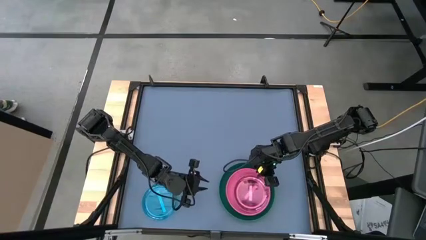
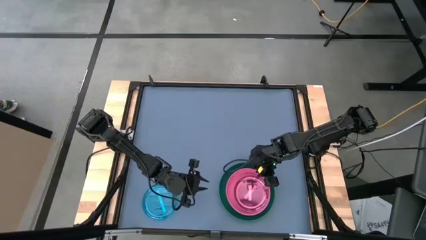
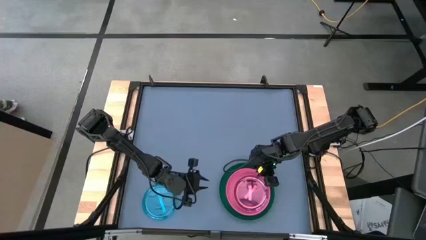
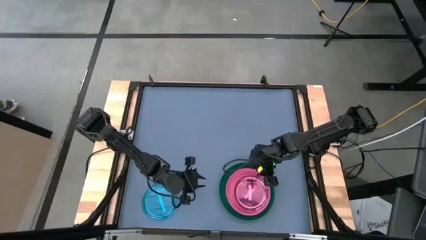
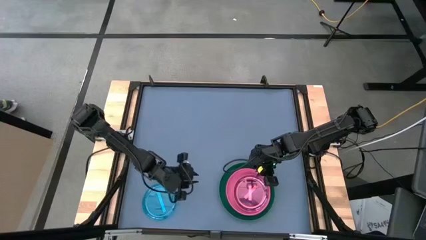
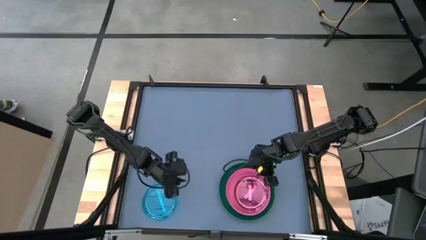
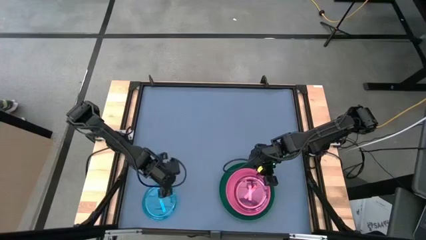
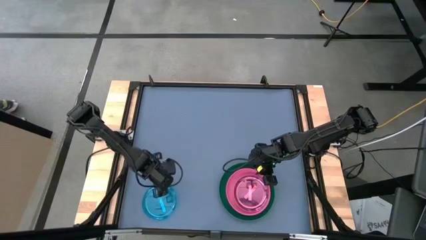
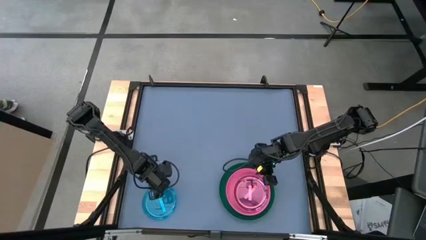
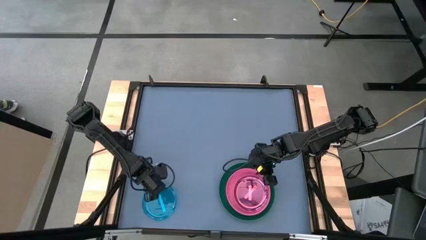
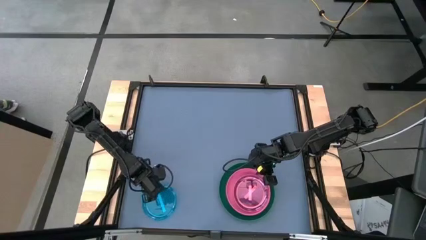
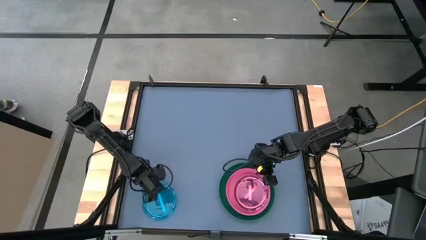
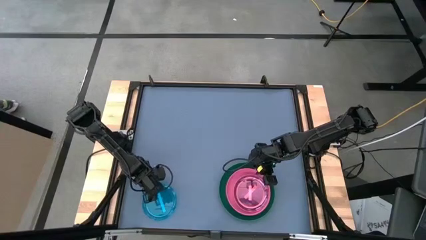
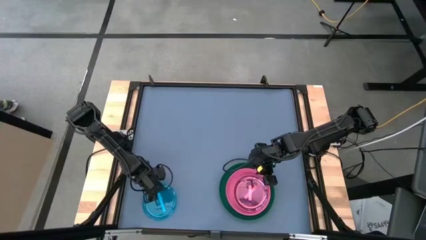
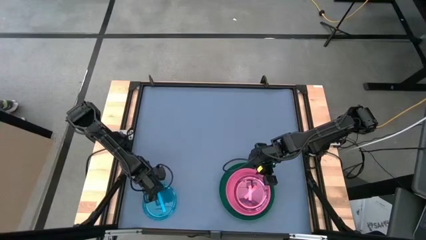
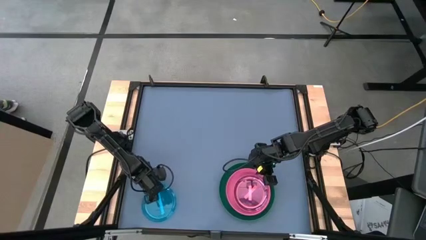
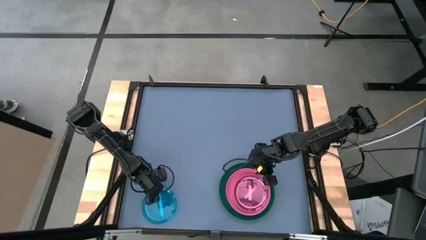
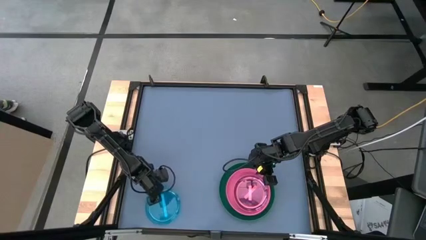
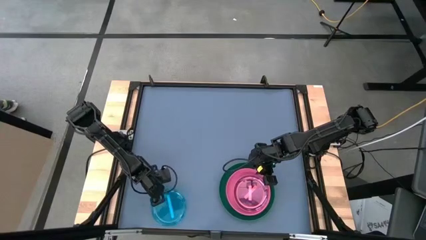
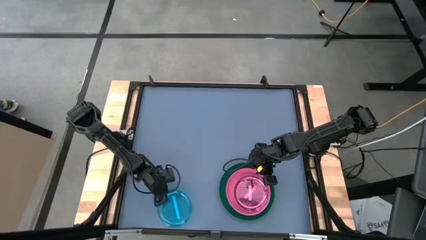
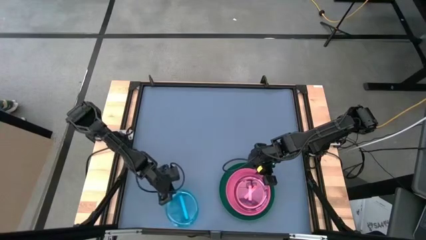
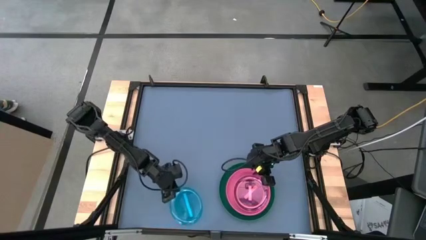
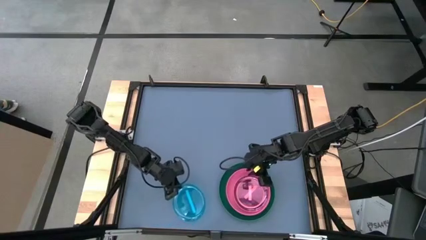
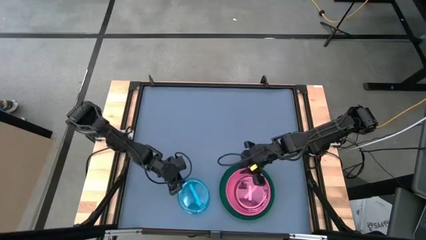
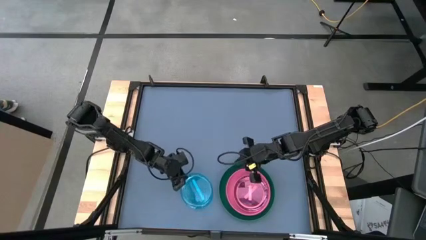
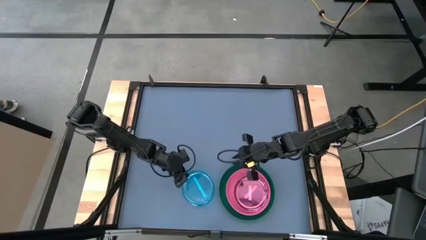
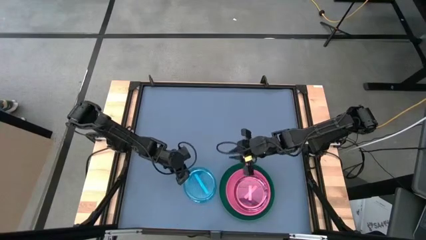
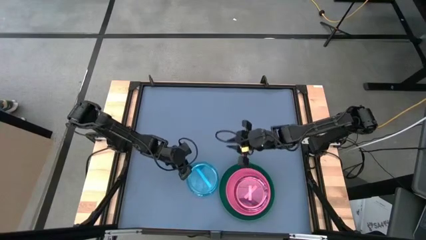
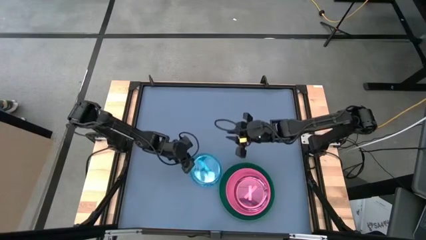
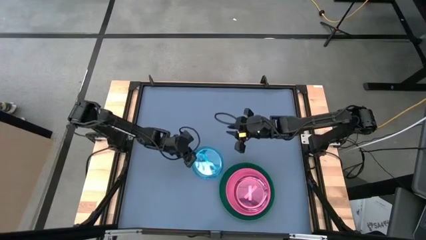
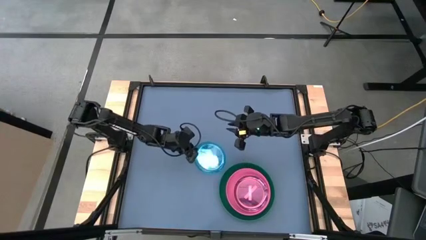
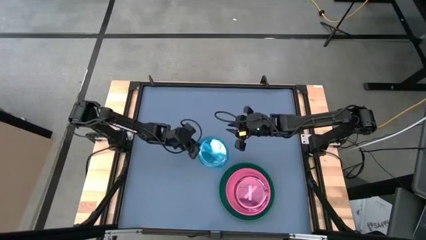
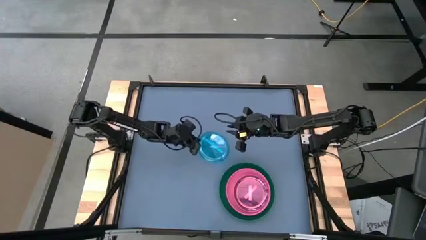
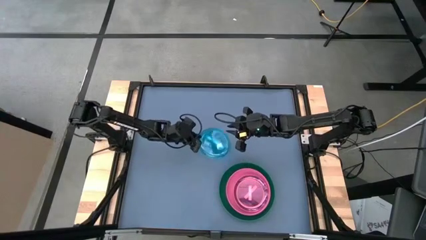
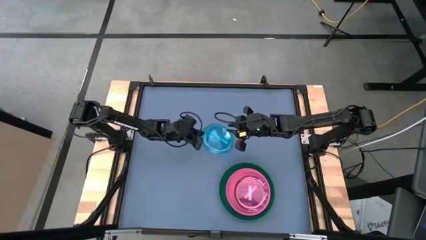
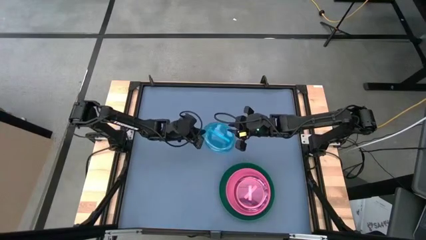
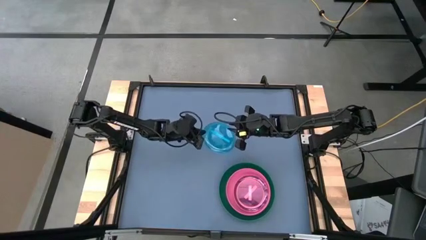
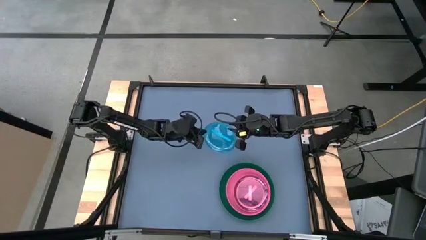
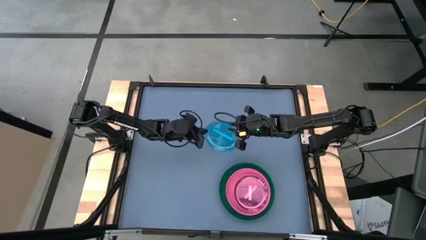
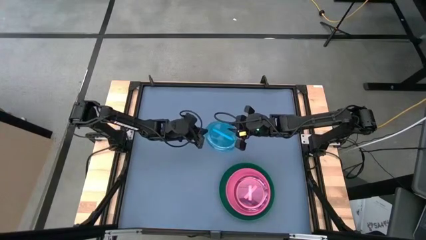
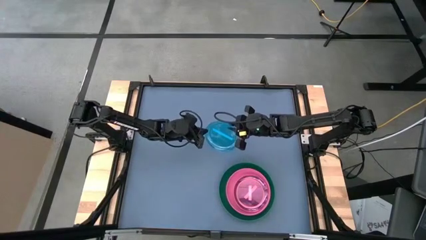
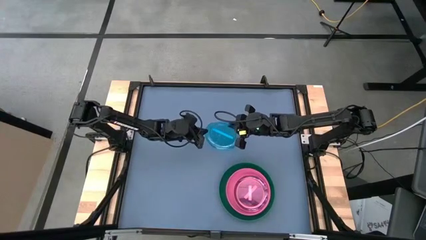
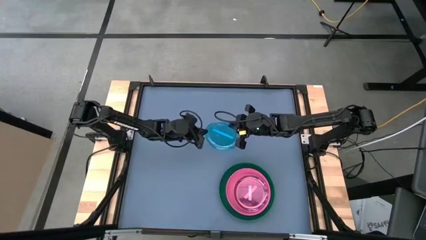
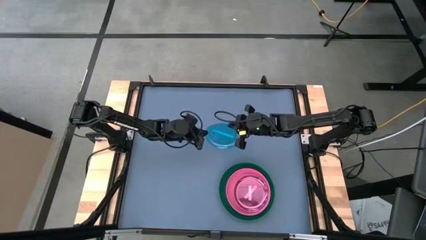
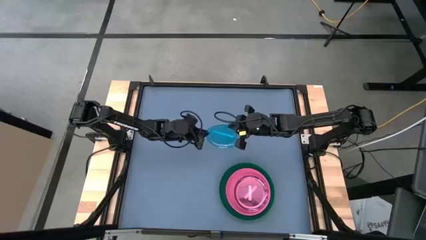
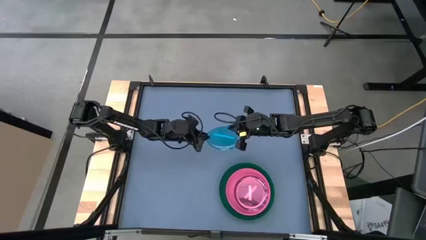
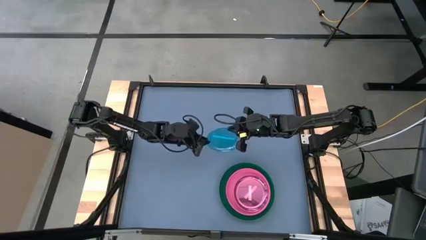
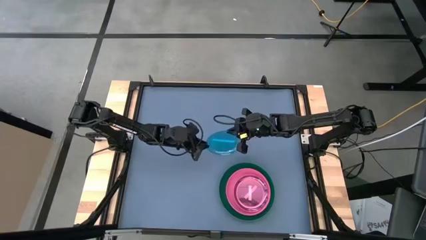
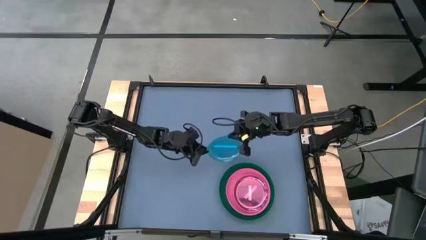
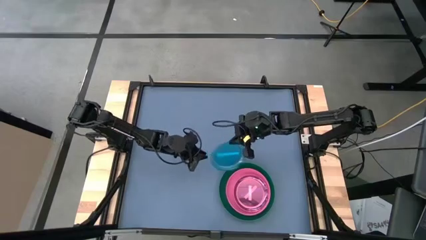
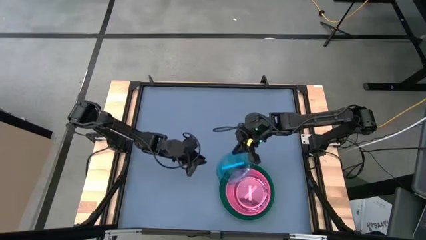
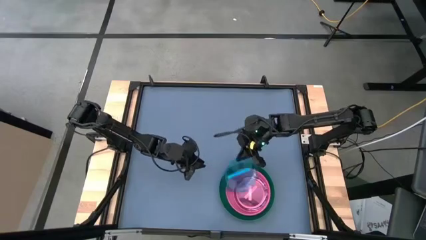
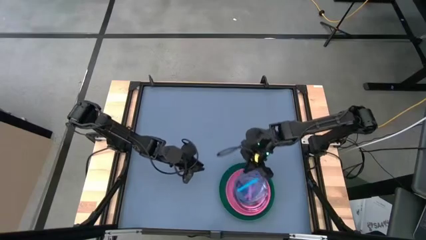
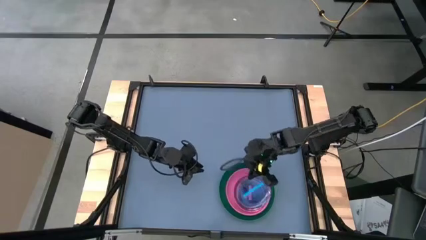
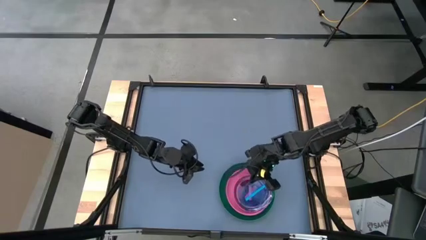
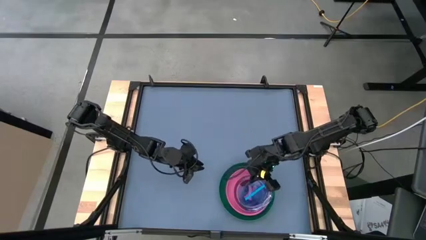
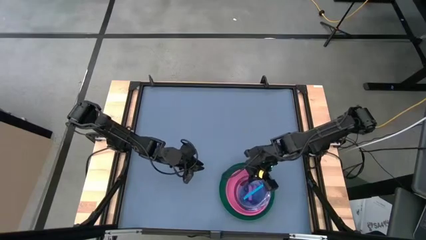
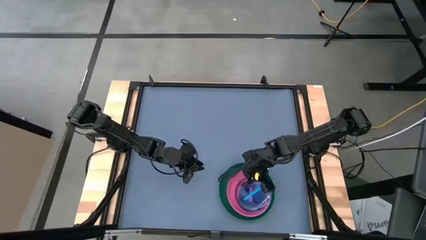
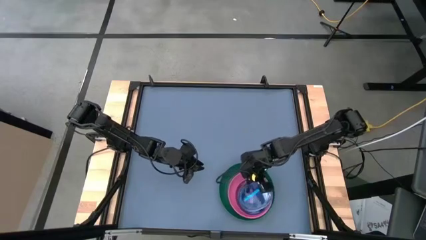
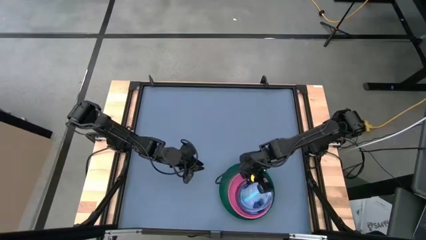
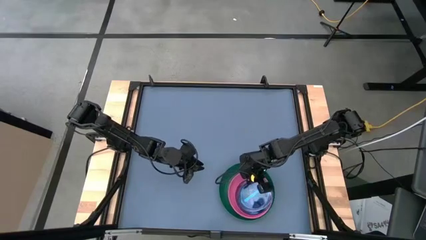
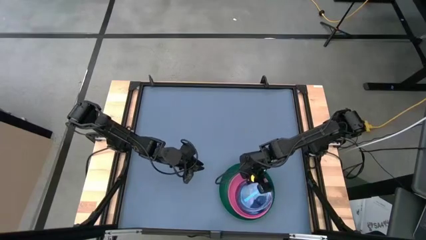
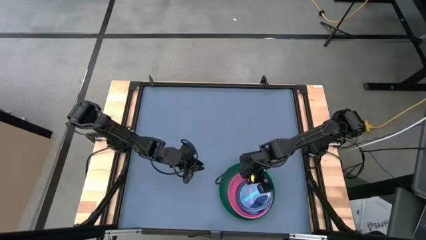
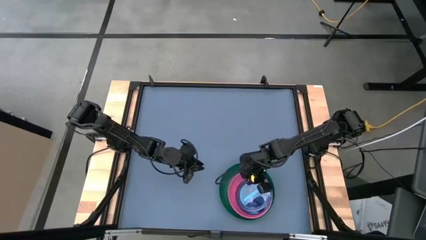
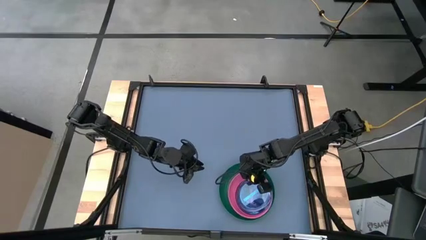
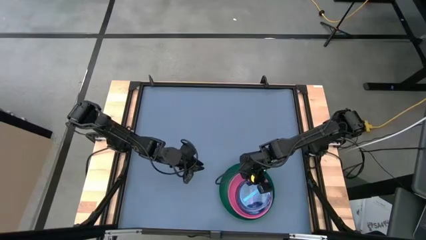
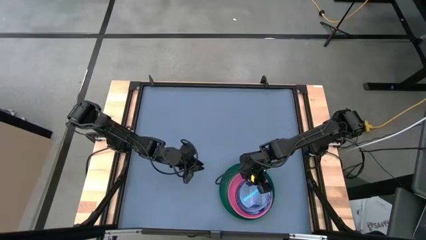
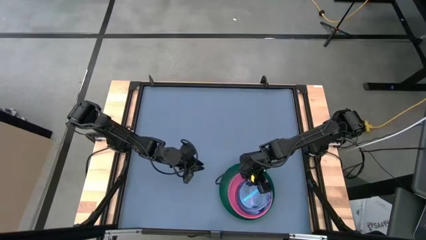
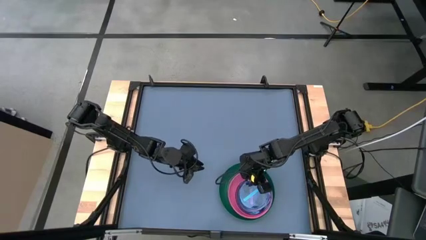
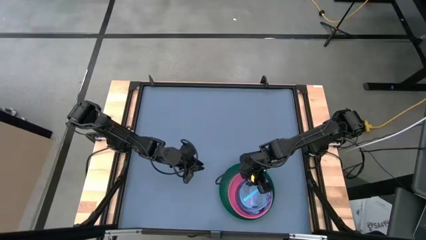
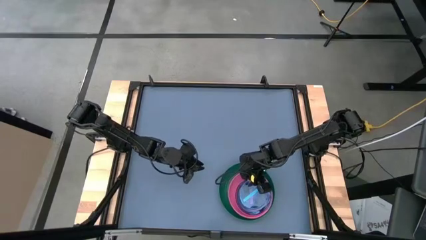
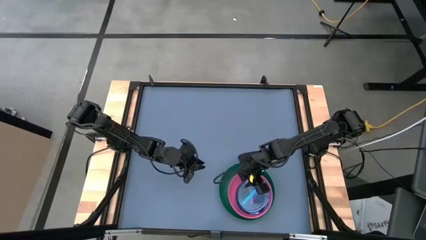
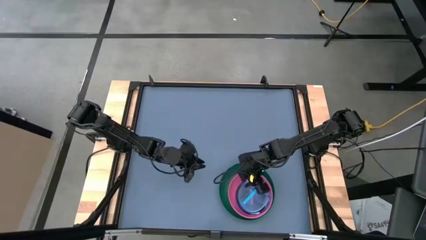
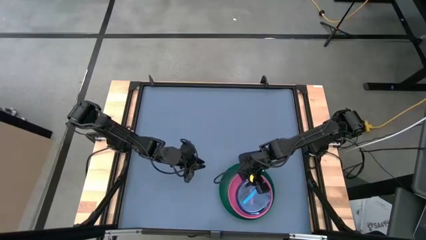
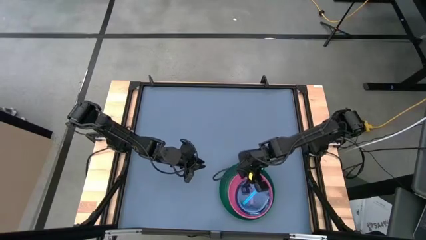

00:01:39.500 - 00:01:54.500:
Task: Stack plastic plates
Stack the blue plate on top of the light pink plate

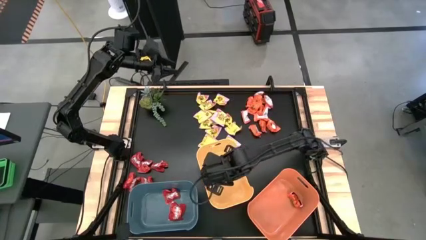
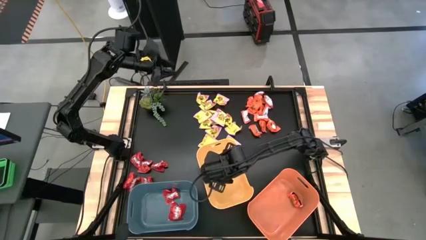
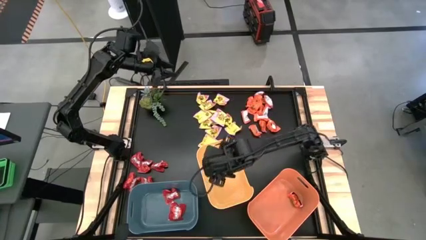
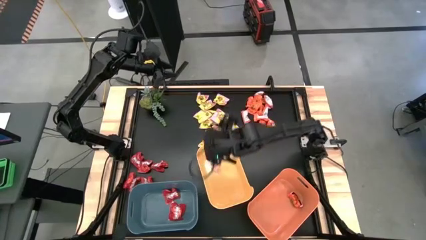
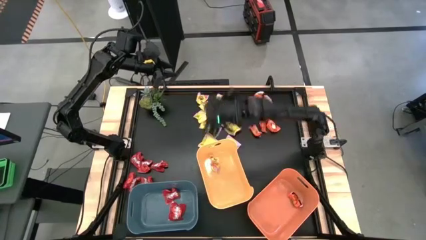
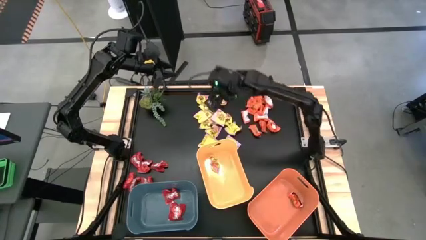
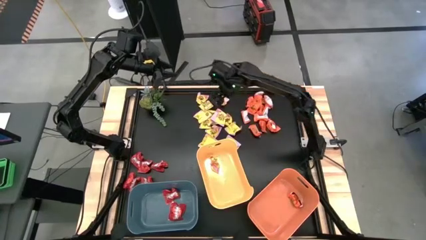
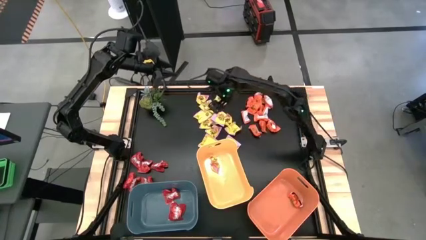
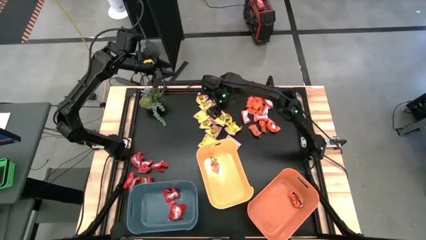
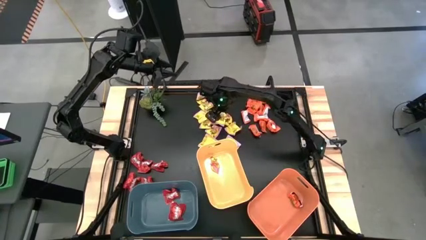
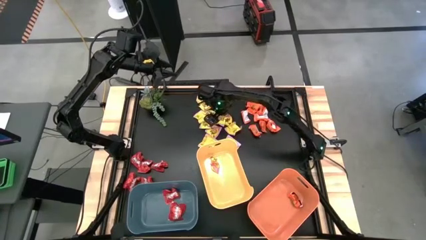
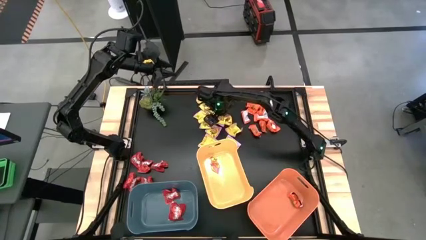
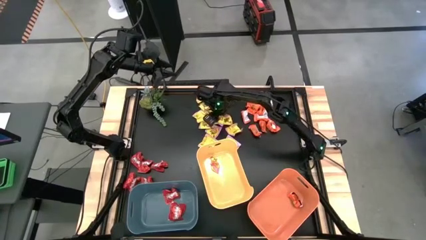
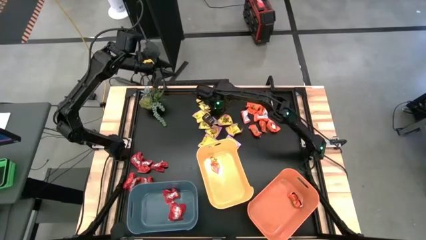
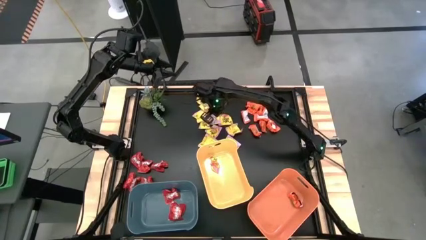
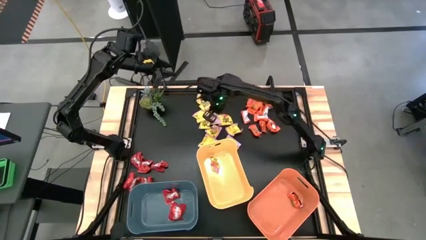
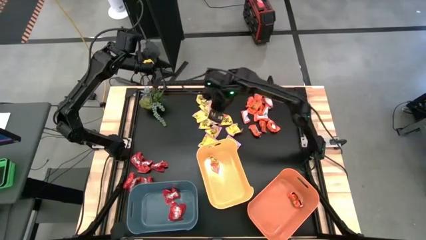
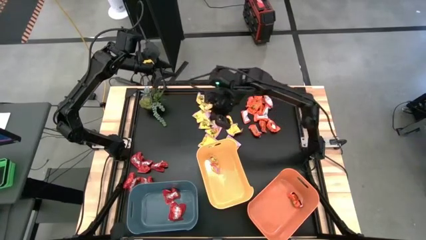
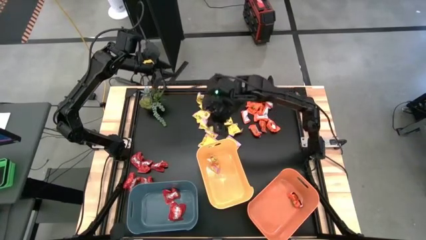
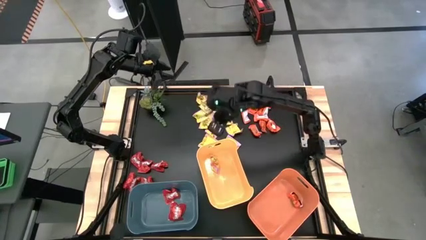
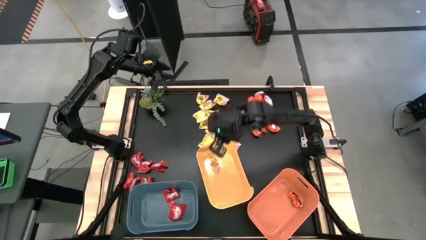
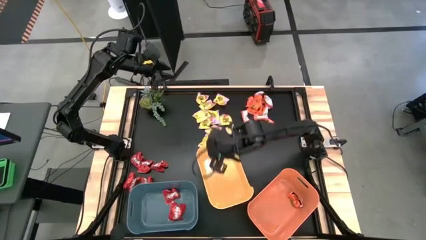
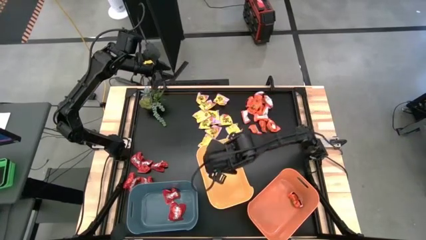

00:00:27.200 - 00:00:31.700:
Task: Sort candy
Put the yellow candy into the yellow bin
